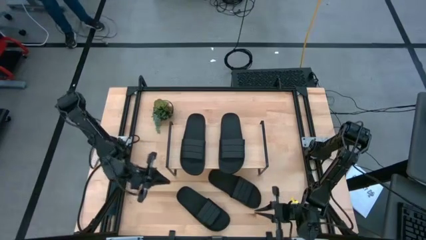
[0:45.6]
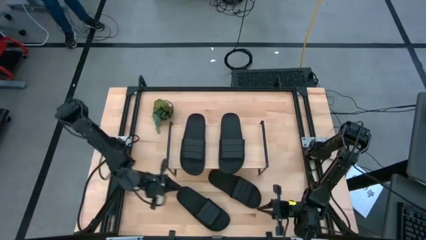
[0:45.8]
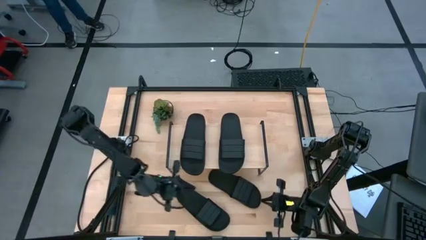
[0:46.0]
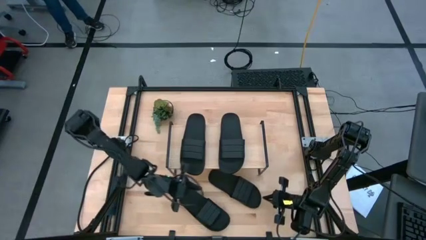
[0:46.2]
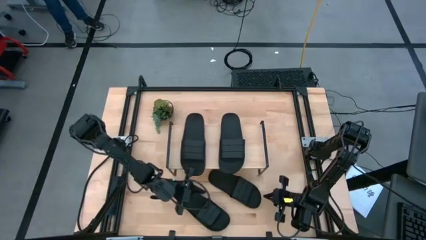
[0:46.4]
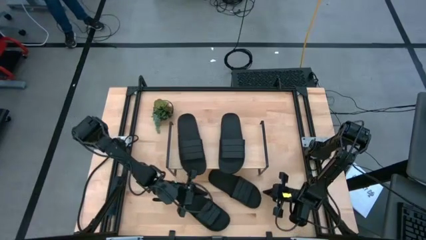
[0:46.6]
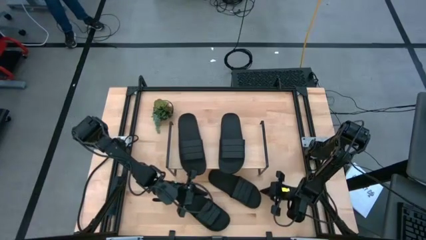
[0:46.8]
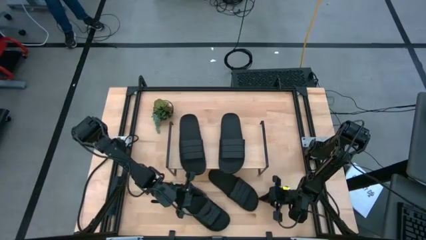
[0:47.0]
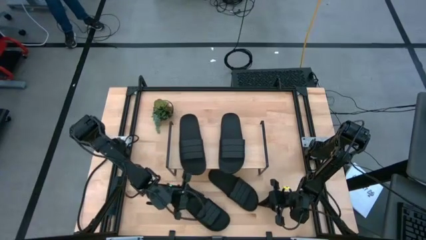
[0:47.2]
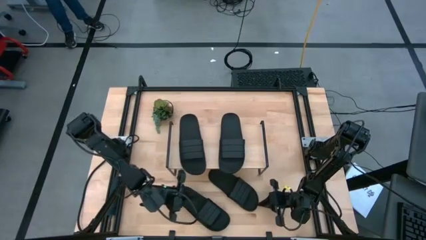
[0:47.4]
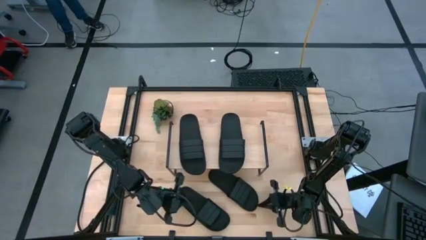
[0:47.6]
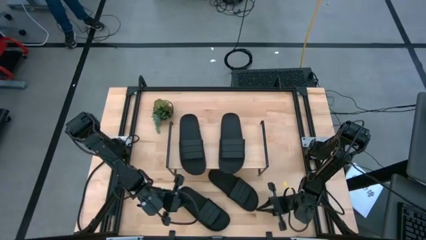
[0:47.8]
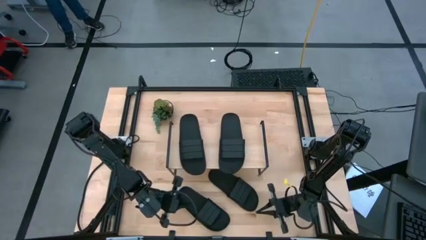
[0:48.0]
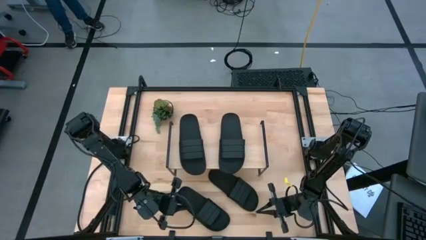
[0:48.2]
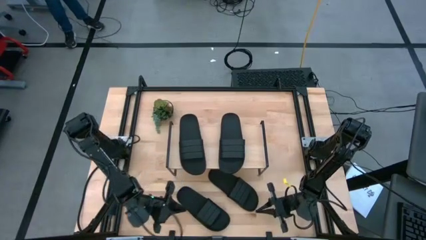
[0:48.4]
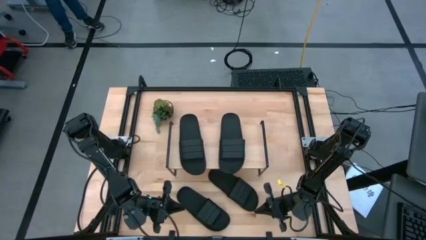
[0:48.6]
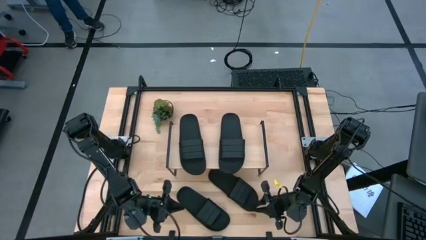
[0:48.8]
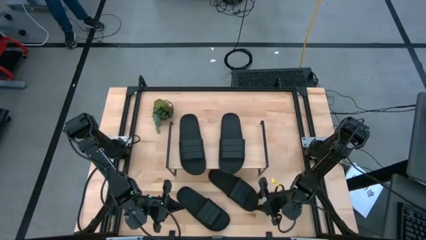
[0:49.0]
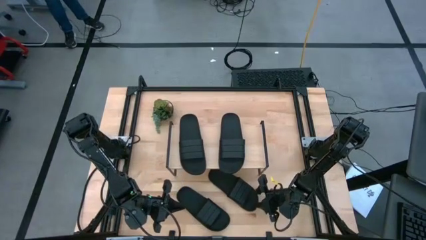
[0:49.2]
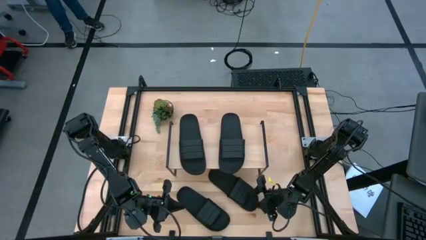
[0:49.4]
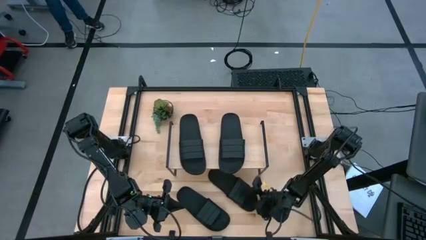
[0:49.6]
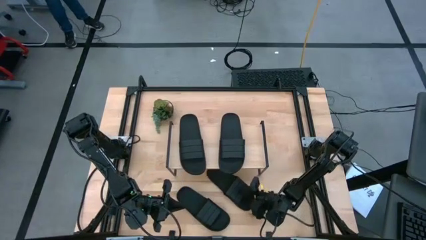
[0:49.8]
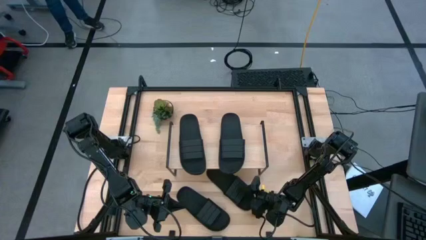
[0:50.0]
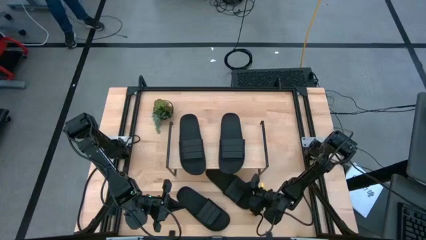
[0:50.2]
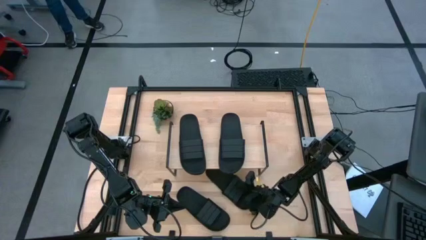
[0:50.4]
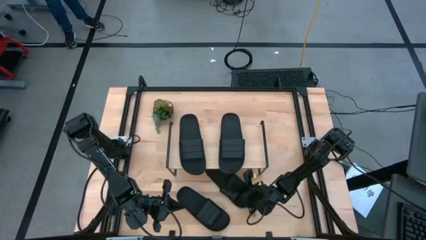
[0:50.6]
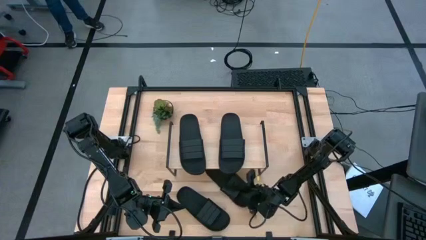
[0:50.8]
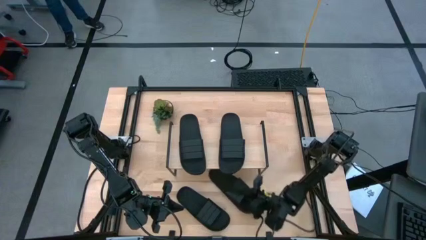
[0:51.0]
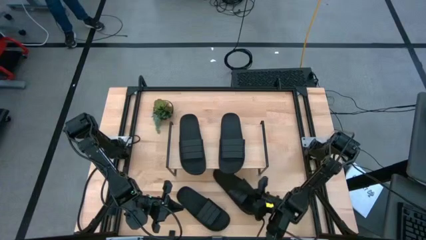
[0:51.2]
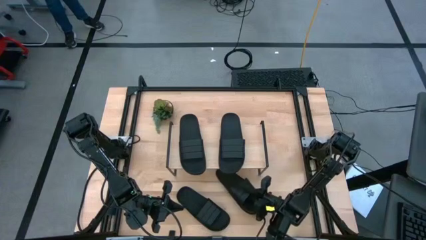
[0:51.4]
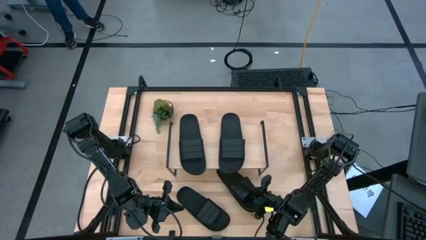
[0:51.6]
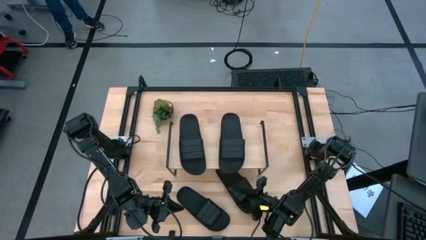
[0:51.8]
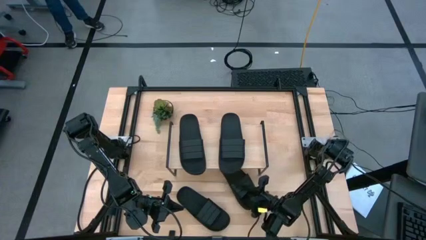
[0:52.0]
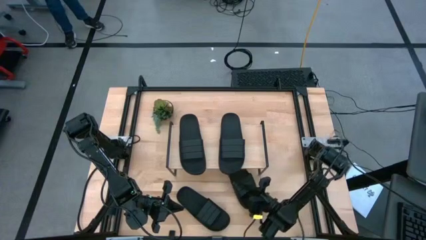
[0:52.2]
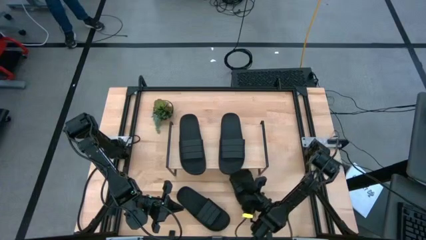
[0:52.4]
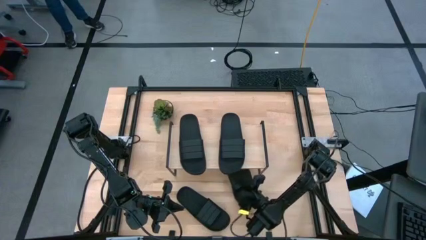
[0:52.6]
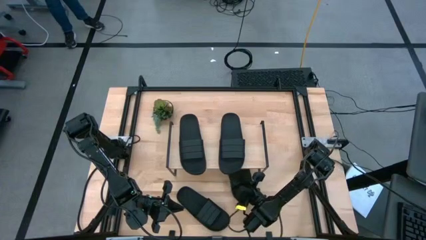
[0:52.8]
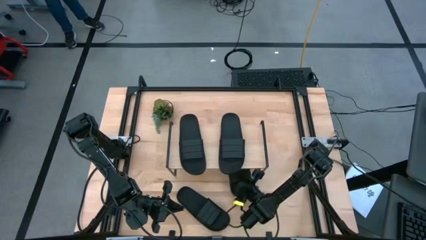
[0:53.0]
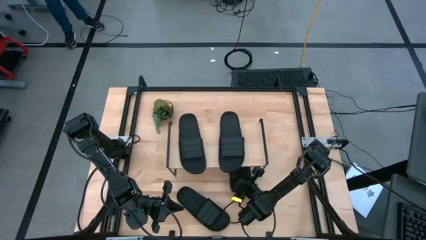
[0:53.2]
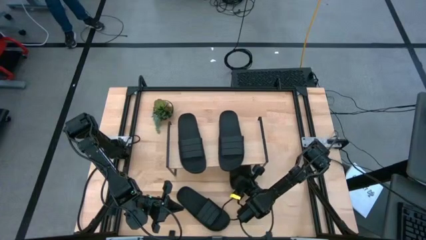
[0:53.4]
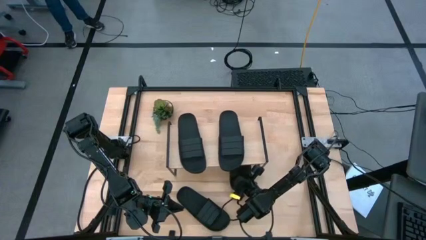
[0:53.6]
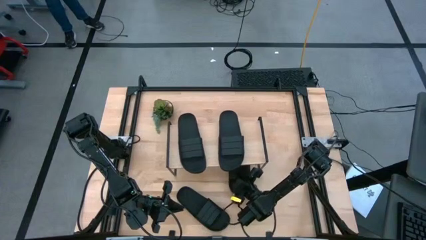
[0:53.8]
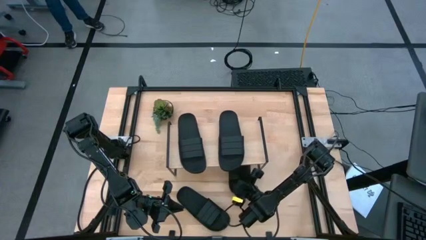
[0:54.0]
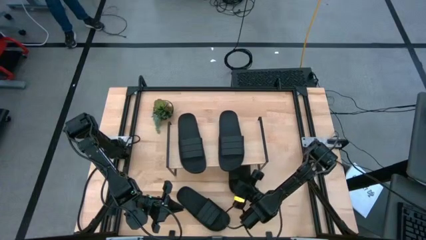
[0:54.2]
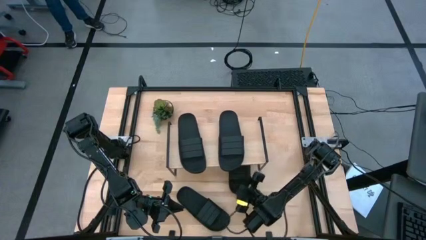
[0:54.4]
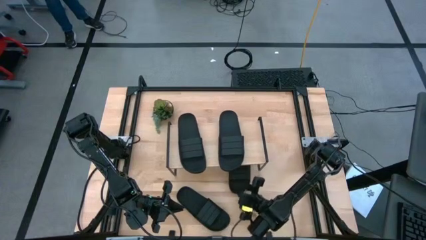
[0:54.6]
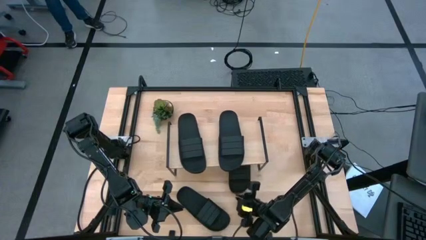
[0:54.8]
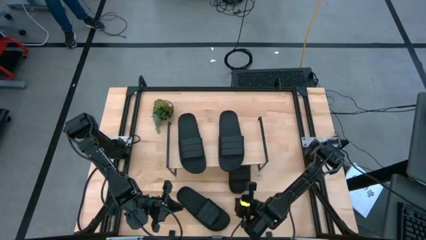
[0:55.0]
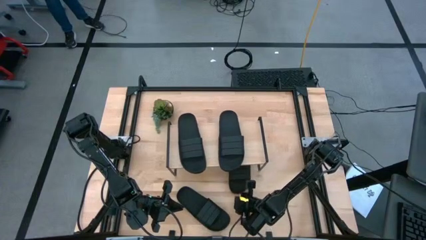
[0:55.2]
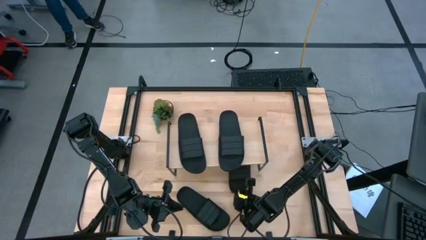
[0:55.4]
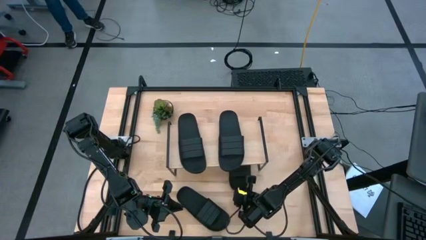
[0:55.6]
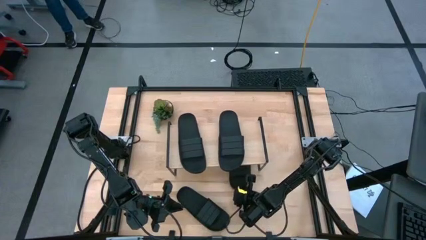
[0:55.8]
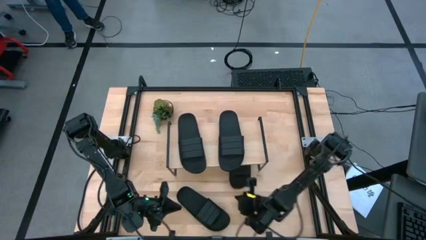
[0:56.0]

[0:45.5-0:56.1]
Task: Pick and place slides into the shelf
Put the black slipper under the shelf

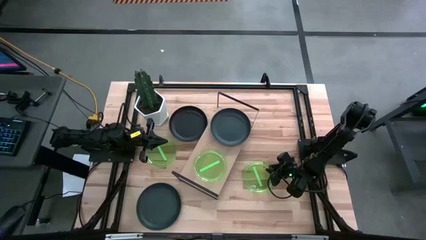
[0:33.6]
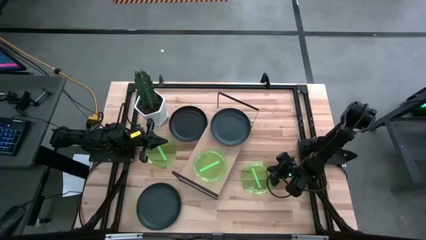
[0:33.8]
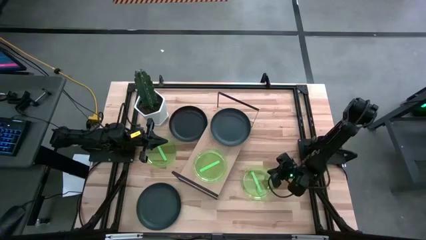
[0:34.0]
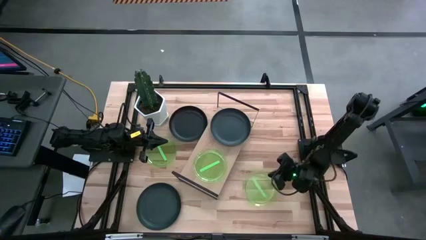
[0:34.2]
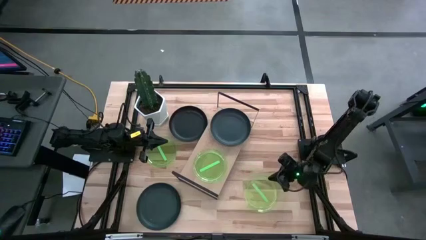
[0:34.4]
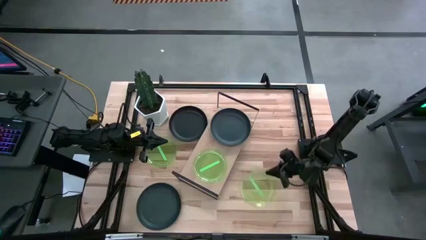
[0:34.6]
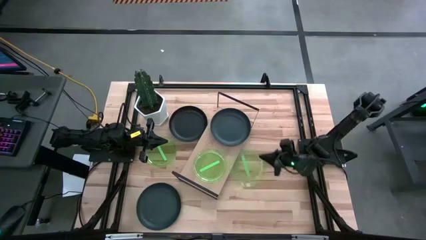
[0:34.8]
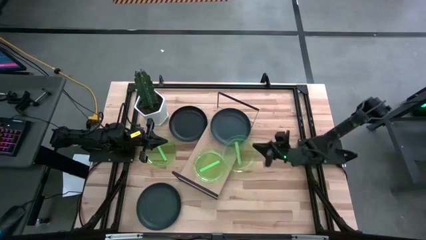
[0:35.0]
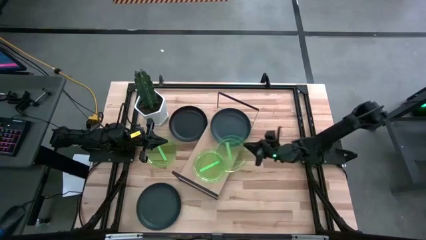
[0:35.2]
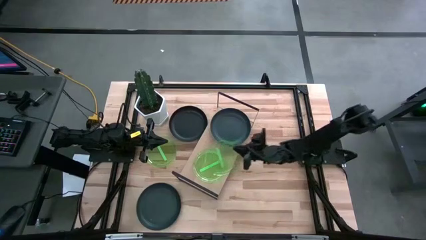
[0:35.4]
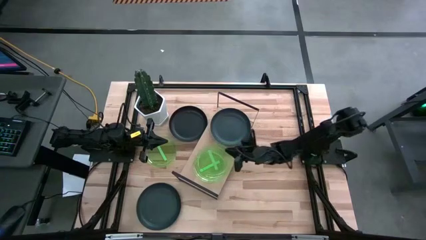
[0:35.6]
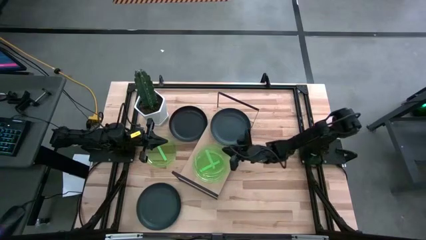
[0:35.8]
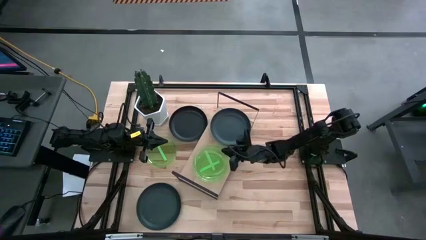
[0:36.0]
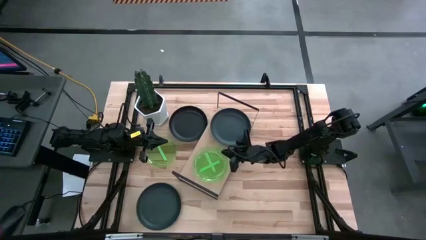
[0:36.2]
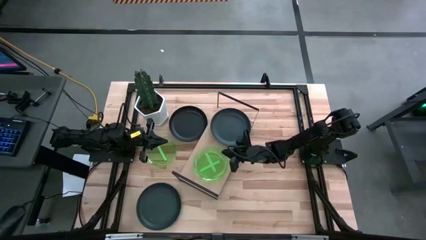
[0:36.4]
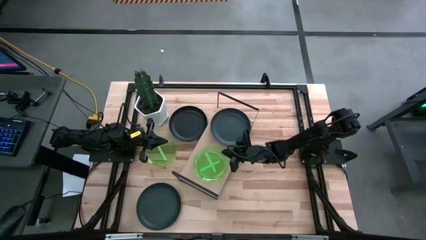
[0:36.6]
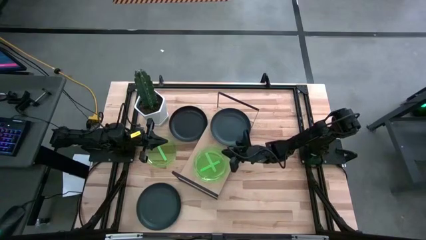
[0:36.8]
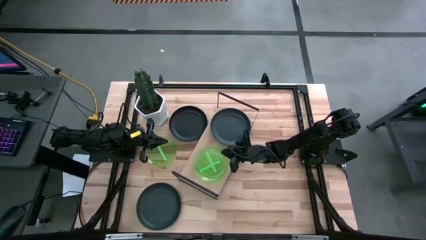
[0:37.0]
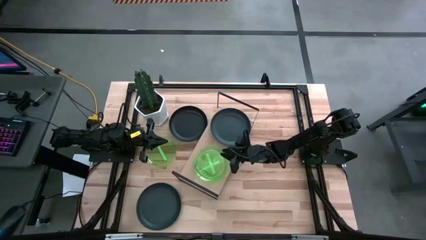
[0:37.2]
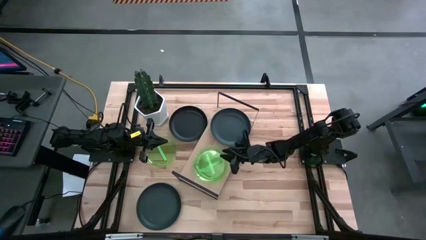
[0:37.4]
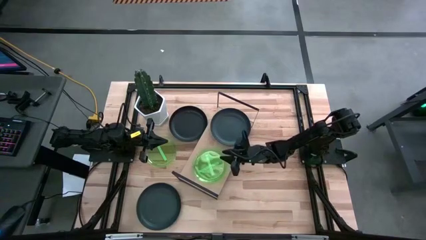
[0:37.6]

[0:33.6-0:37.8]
Task: Place and stack plates onto a shelf
Stack the bottom green plate on top of the green plate on the shelf
